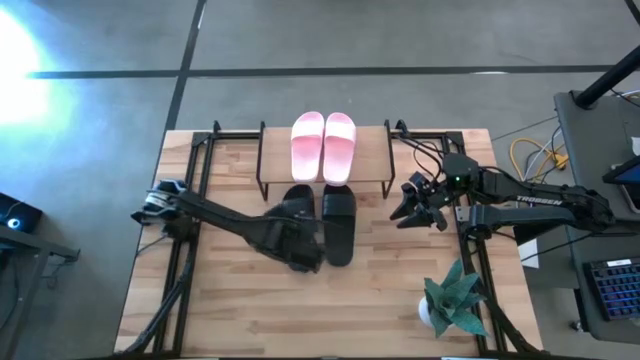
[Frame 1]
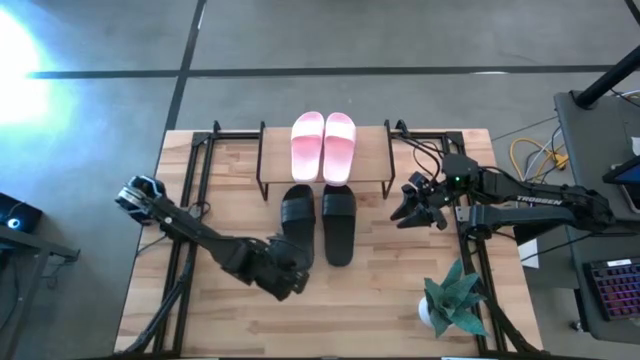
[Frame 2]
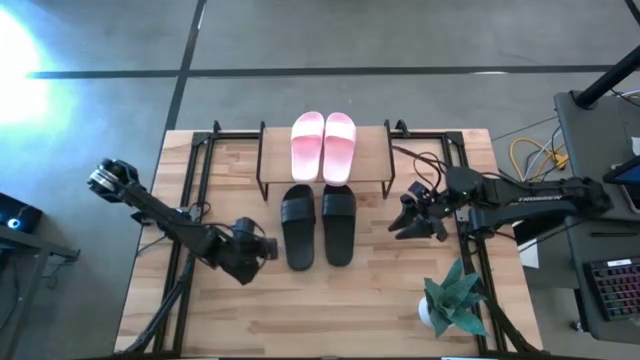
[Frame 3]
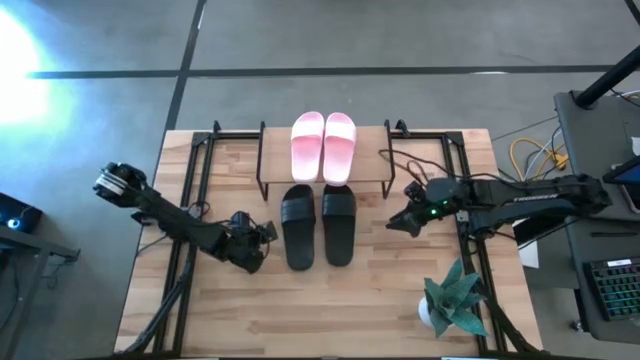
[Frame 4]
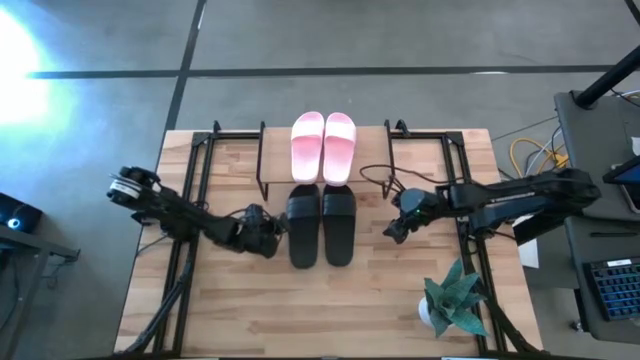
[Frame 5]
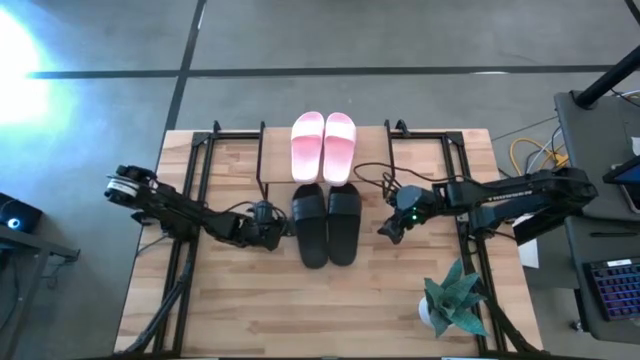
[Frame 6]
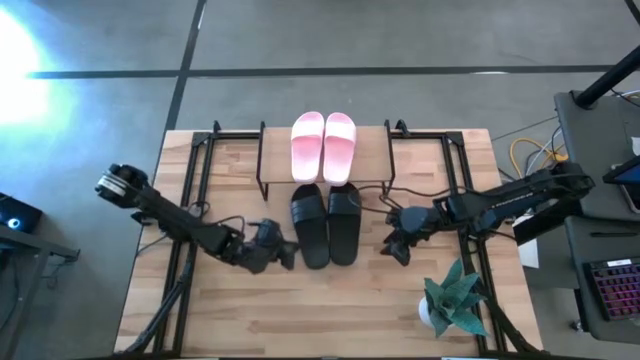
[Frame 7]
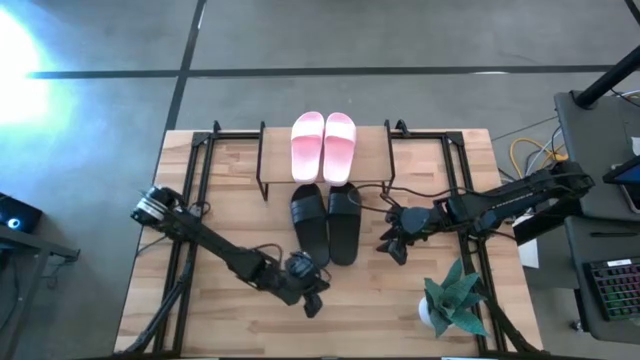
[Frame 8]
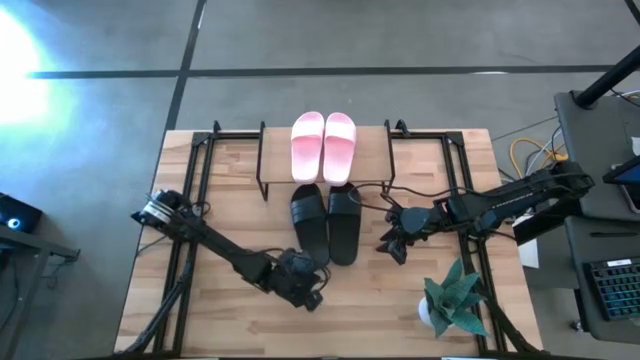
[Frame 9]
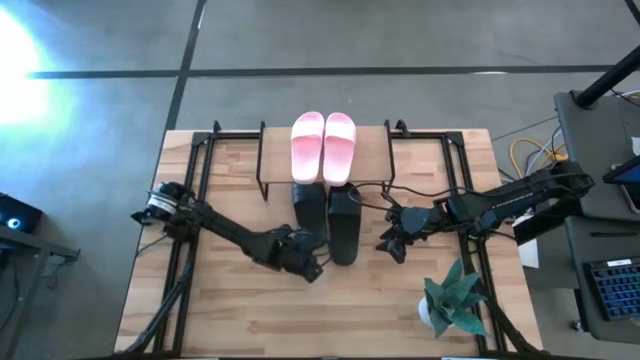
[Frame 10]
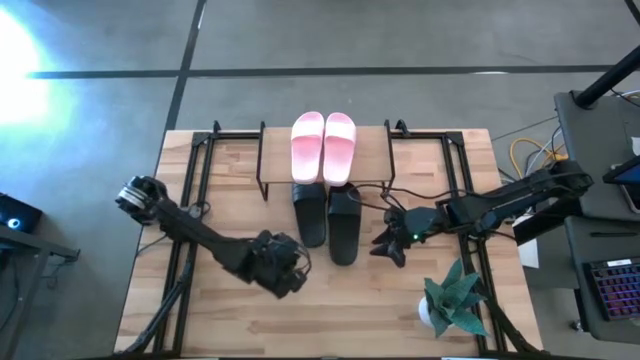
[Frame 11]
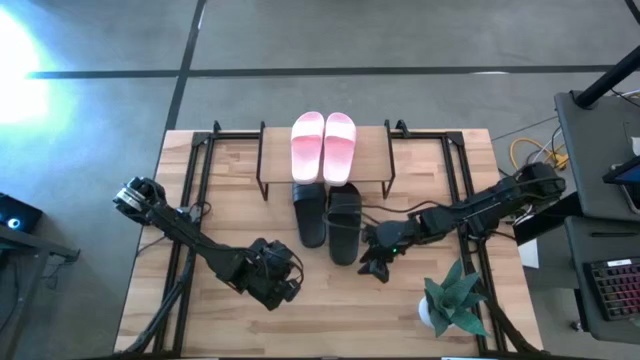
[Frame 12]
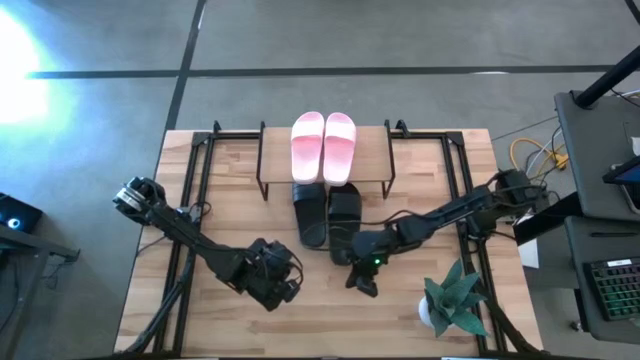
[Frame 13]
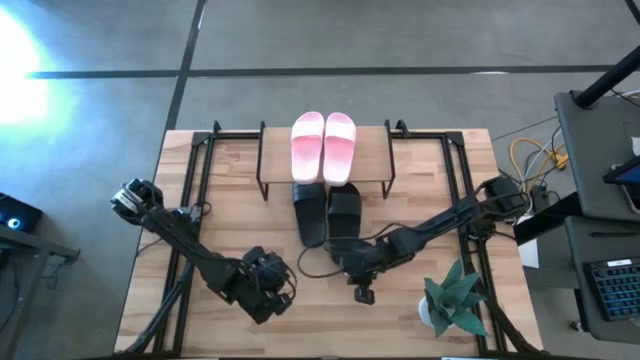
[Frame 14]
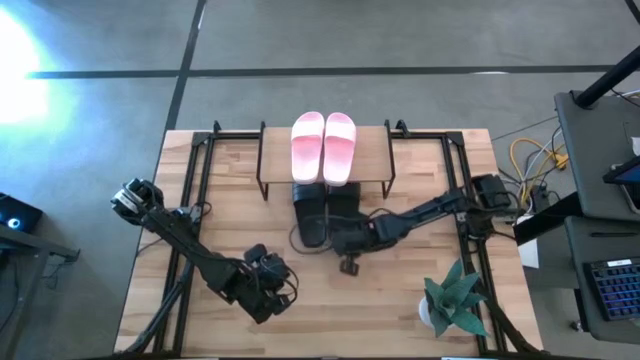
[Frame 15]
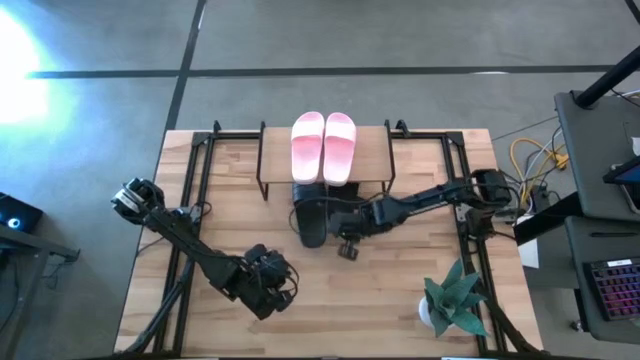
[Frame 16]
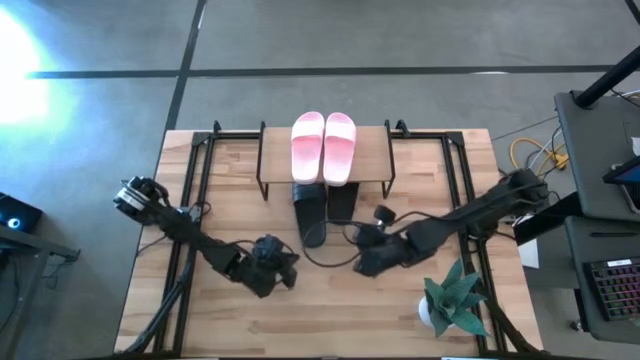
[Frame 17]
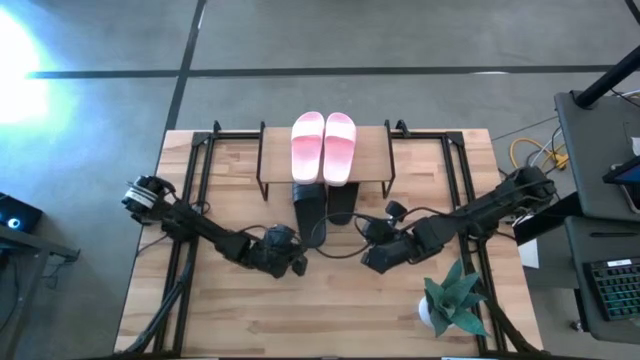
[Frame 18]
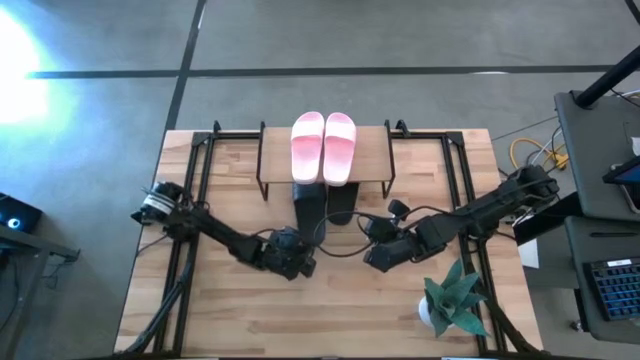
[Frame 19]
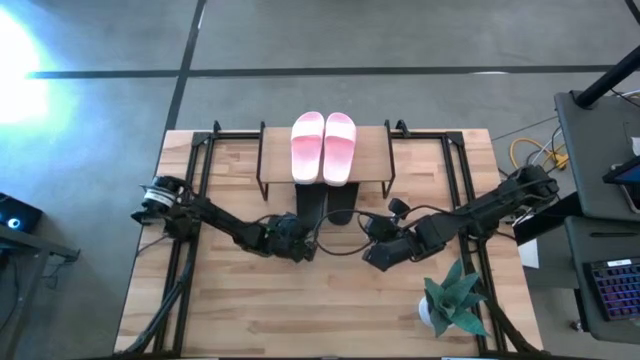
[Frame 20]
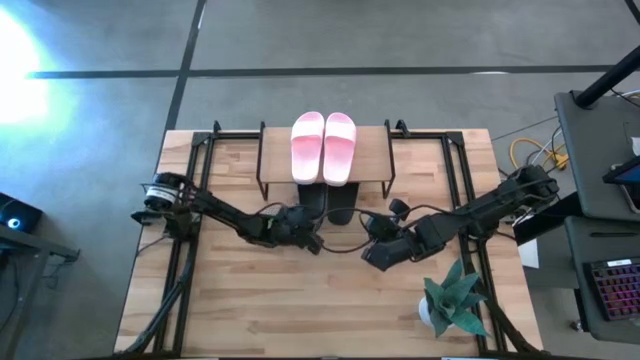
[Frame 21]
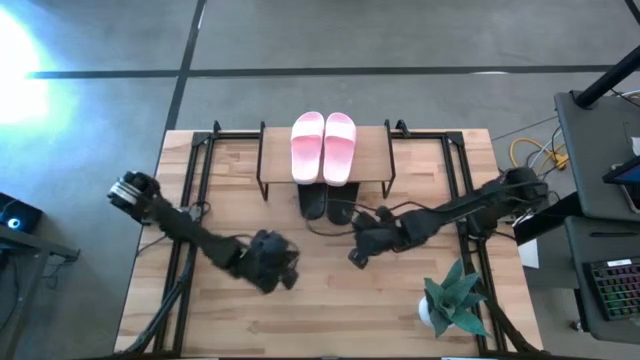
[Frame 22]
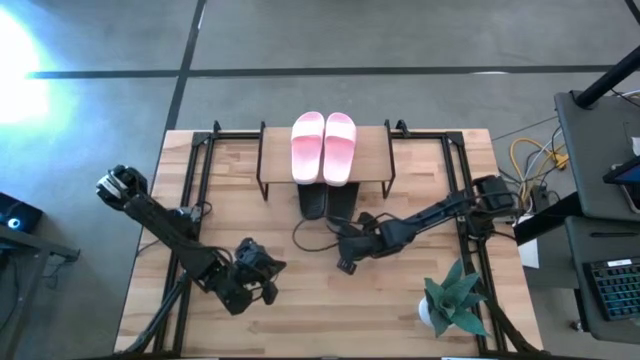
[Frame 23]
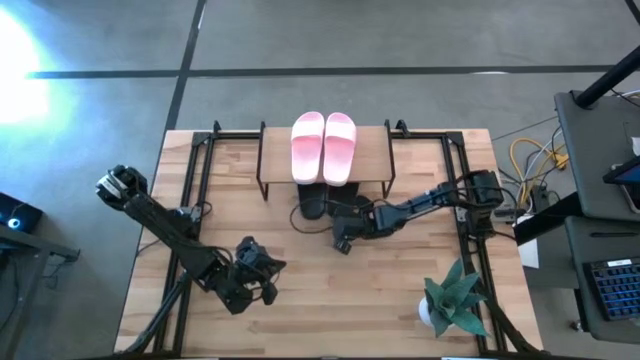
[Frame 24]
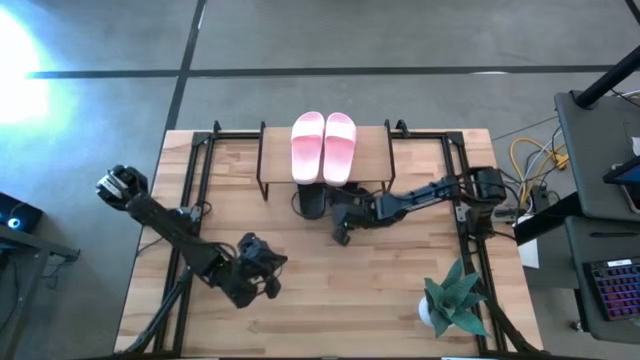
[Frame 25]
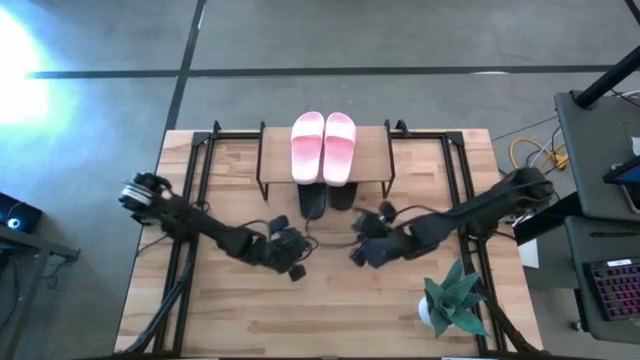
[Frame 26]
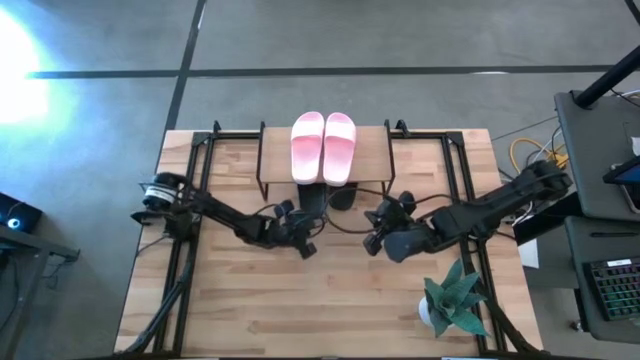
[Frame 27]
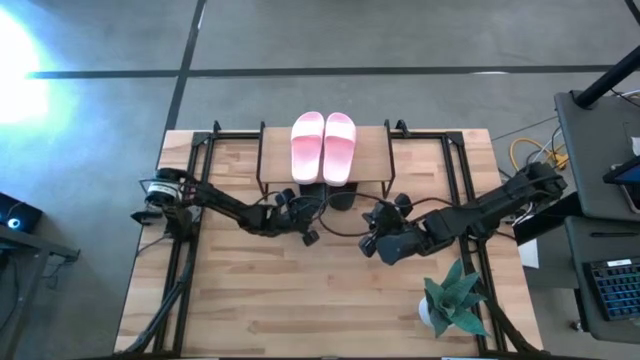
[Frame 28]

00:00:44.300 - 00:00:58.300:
Task: Pick and place slides into the shelf
Adjust the slides under the shelf

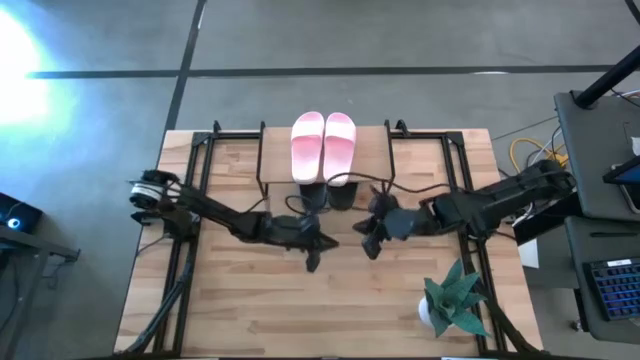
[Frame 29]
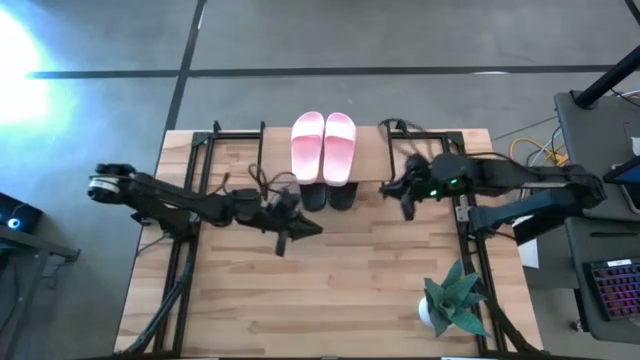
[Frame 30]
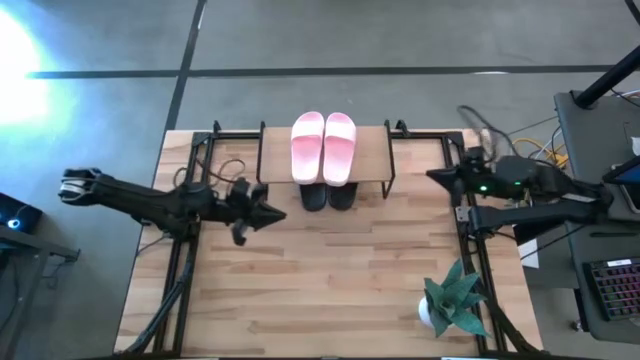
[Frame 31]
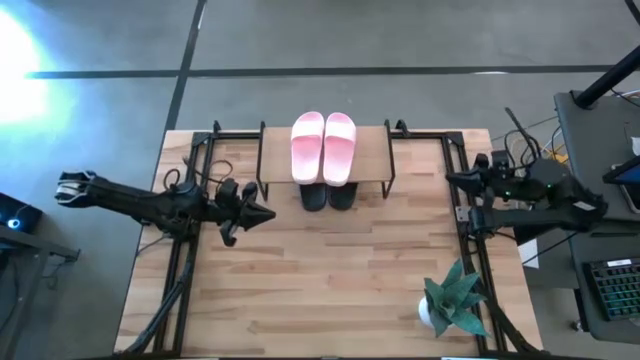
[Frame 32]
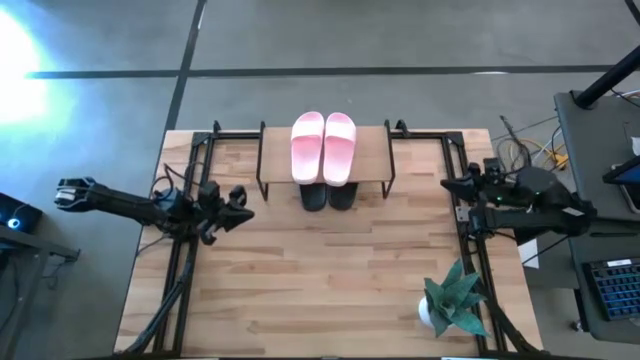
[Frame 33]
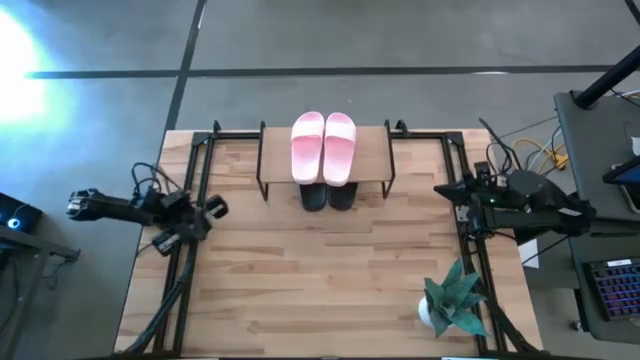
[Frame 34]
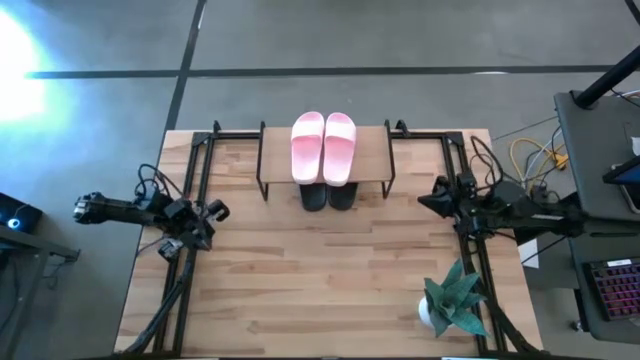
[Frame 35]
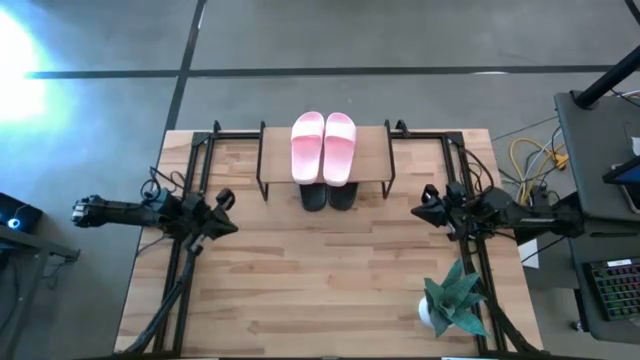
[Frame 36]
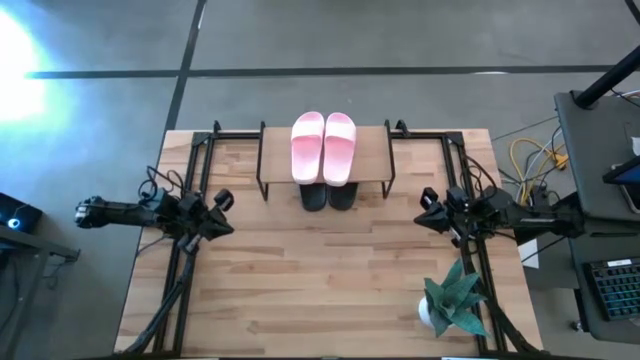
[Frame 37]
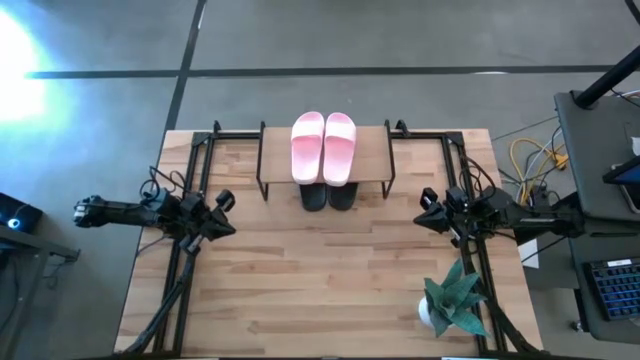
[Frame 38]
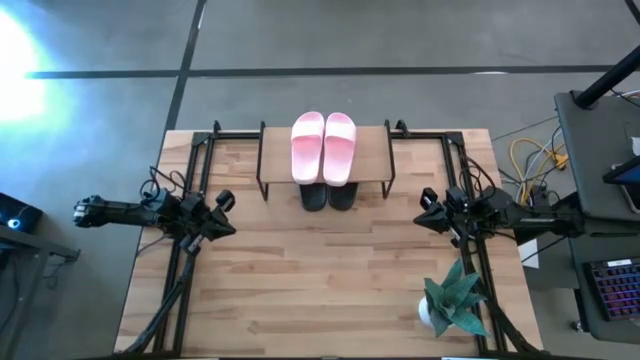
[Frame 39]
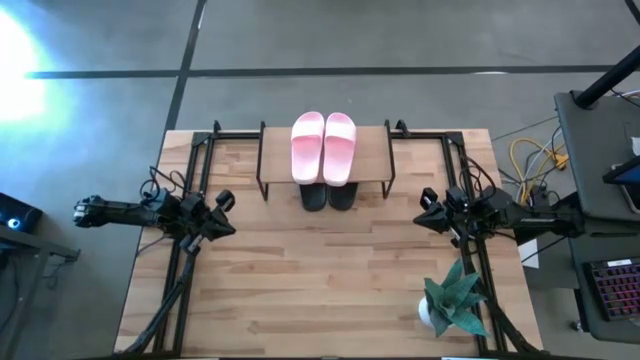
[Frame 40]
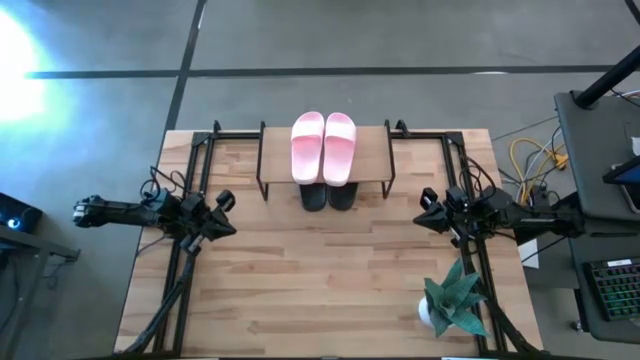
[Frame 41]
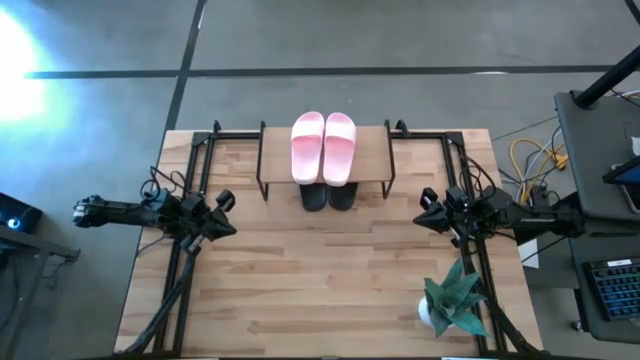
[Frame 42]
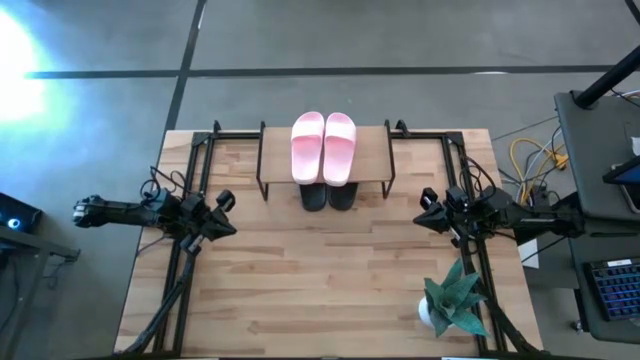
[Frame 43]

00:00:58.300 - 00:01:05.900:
Return to Home Position
